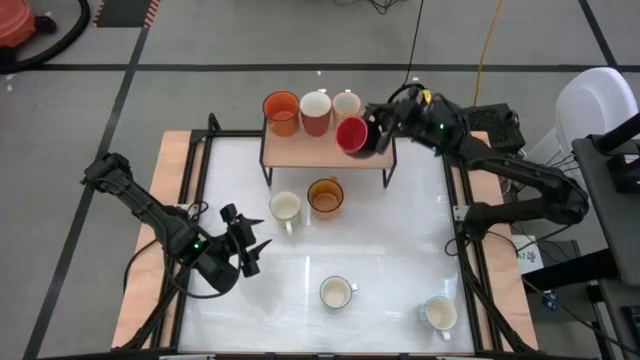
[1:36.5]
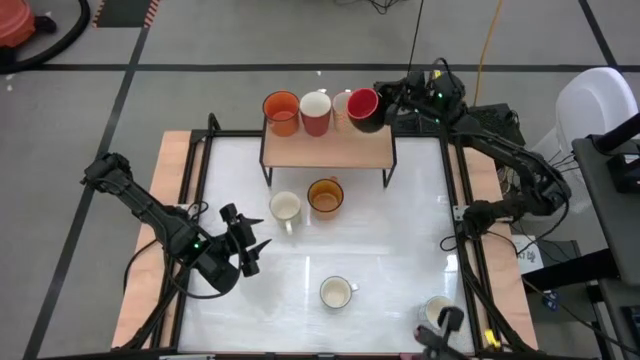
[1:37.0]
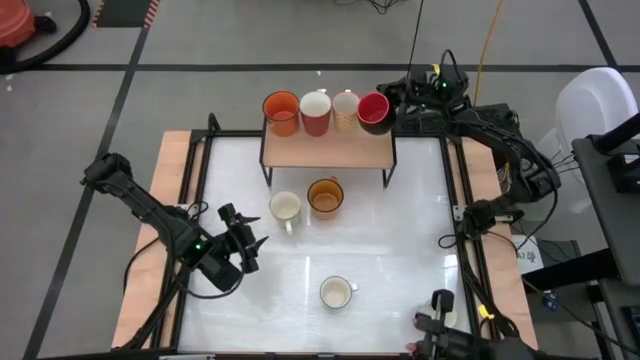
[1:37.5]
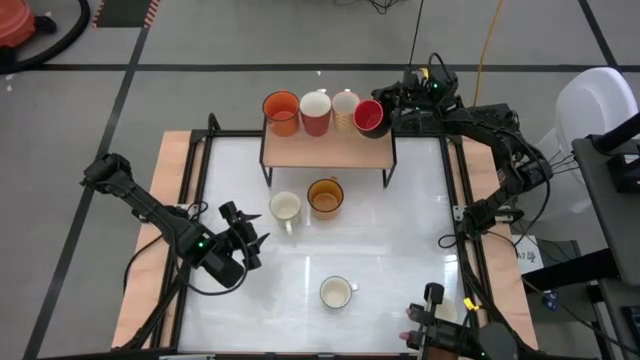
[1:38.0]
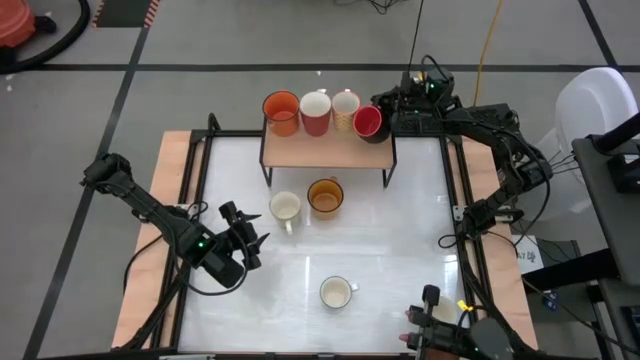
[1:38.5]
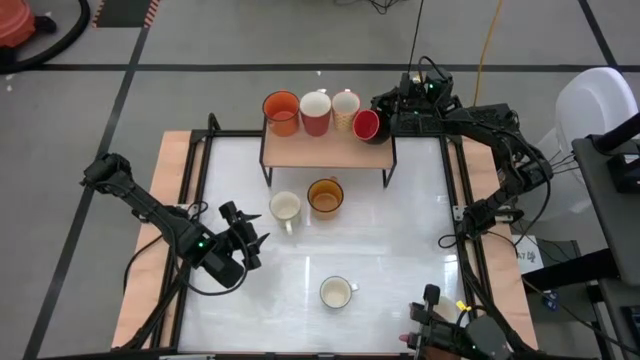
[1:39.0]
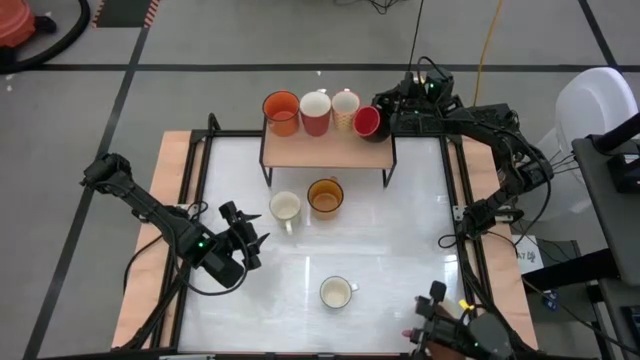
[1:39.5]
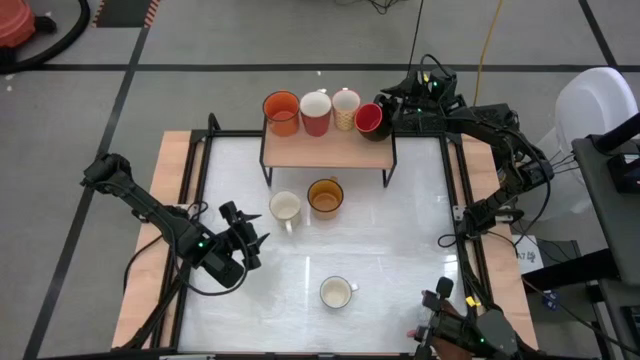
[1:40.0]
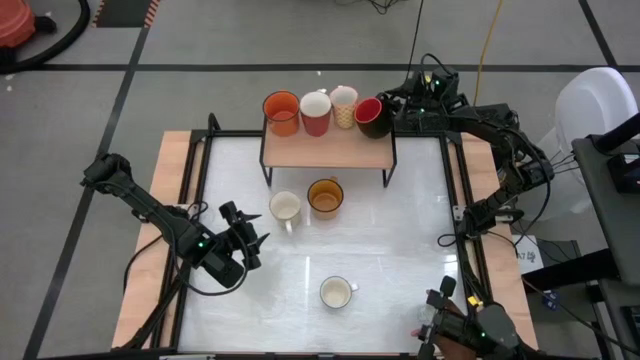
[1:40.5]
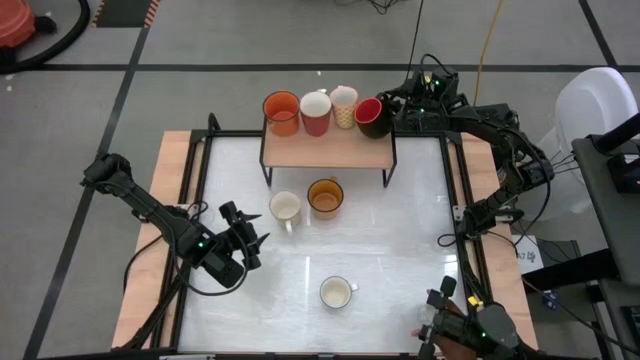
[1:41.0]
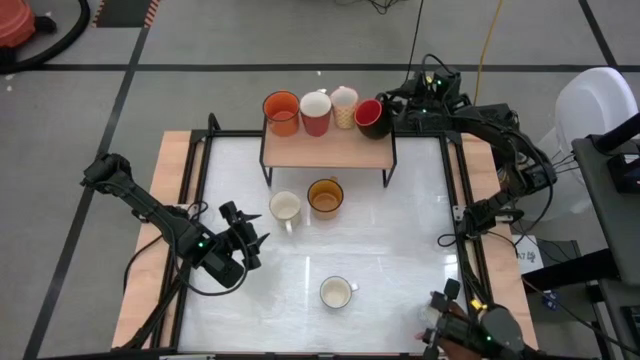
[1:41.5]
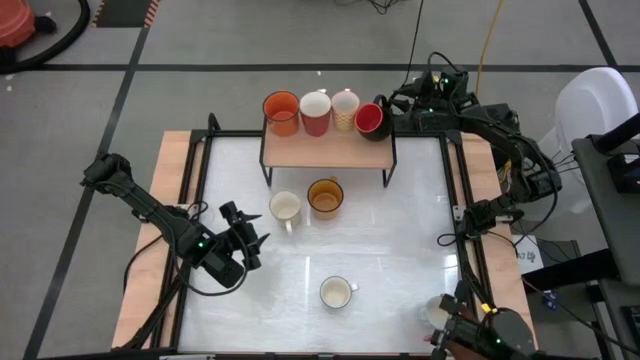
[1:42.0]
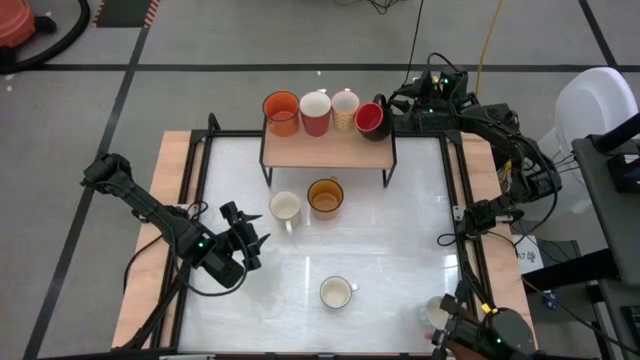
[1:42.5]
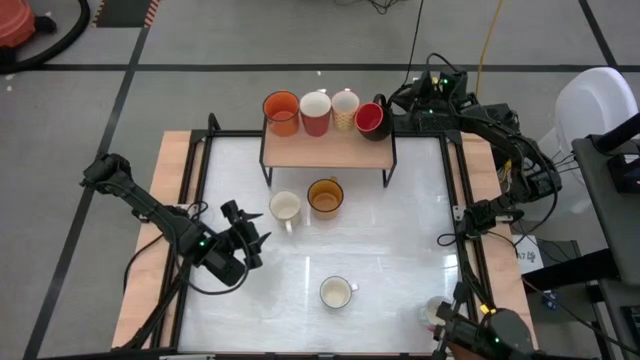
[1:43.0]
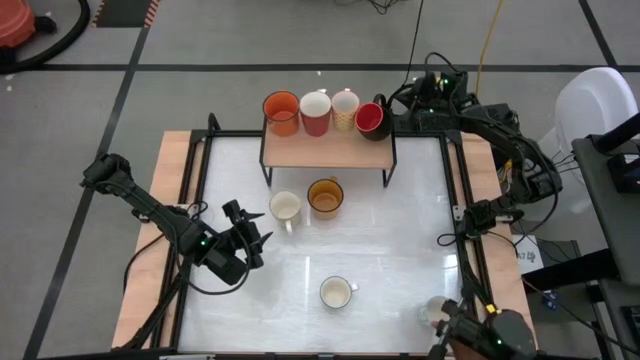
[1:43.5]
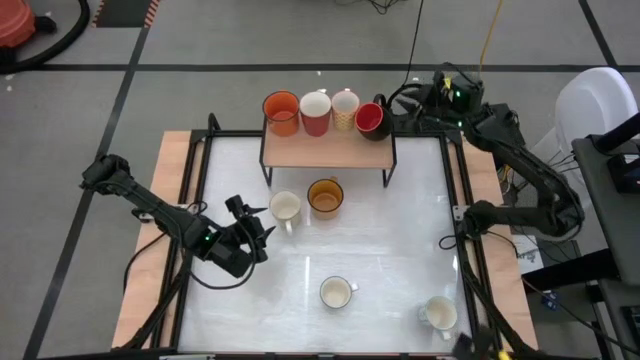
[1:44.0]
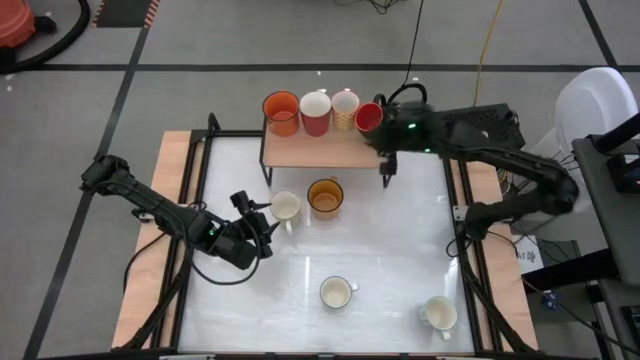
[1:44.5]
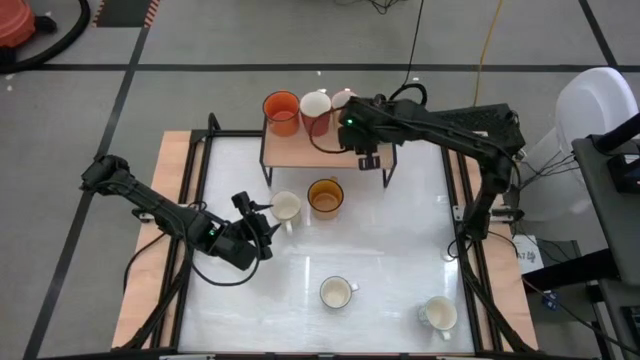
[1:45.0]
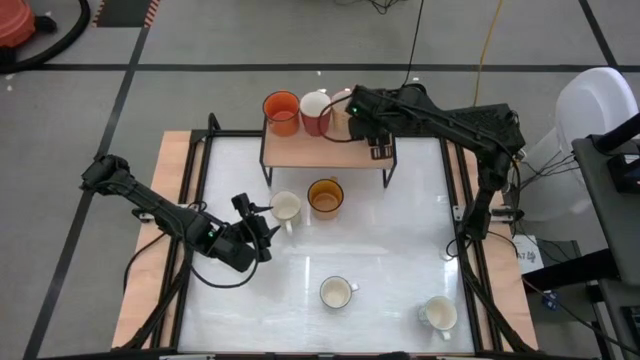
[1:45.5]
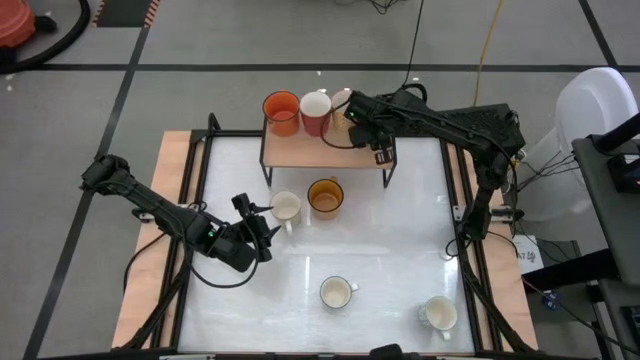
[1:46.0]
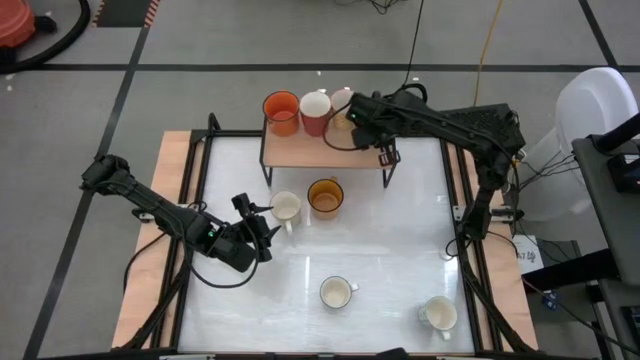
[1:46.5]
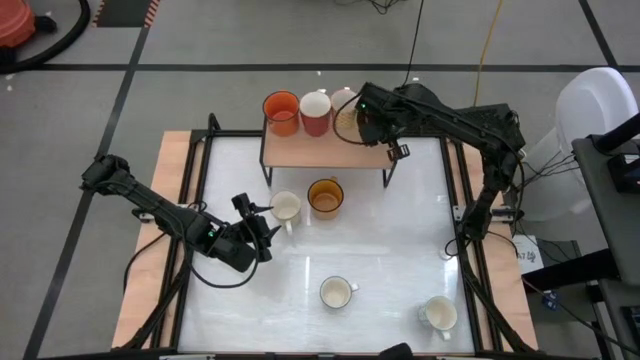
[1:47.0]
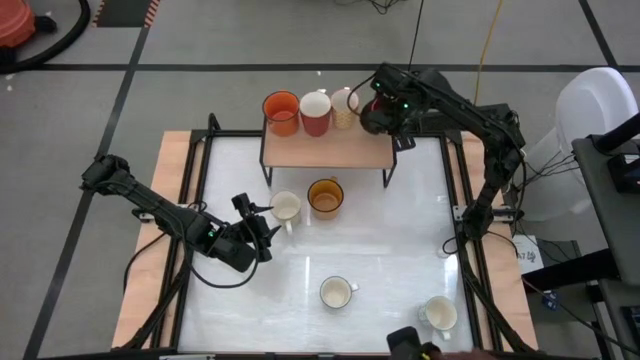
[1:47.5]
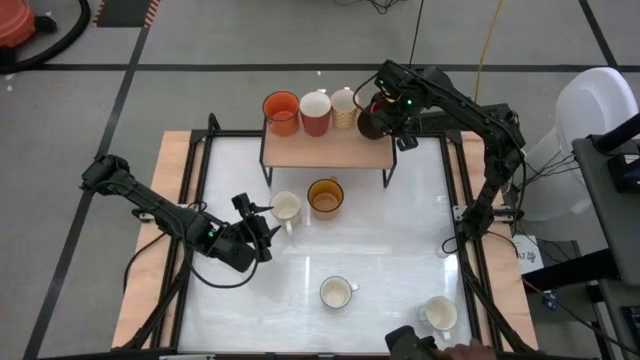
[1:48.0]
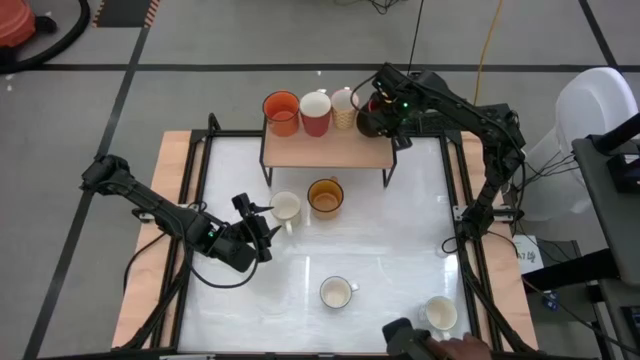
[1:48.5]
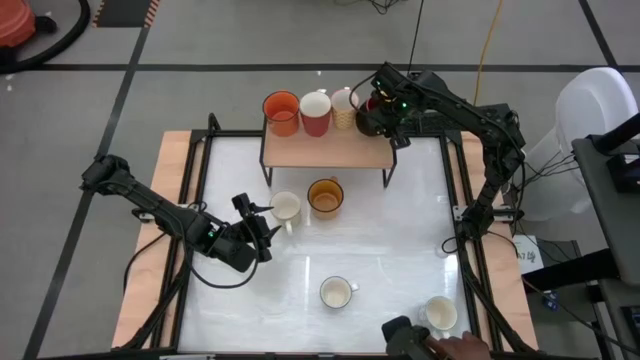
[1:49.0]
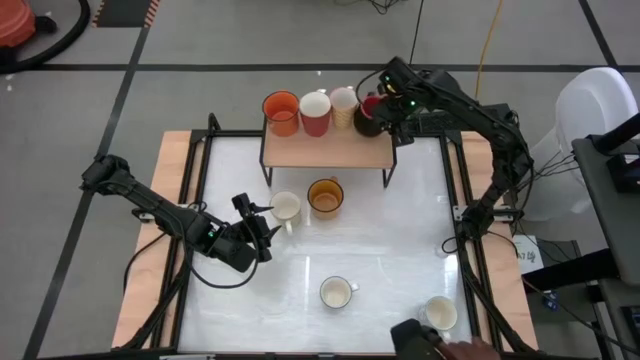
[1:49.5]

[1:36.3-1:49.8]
Task: Place coffee mugs
Put the black mug on the shelf

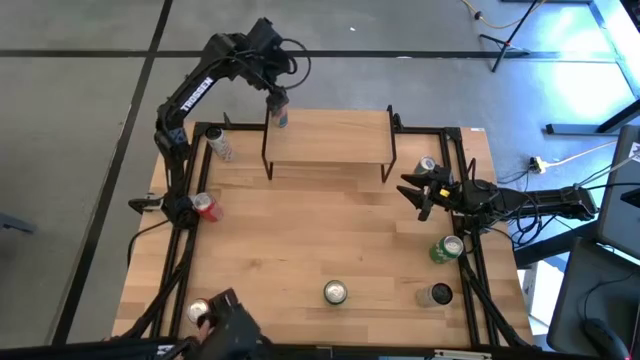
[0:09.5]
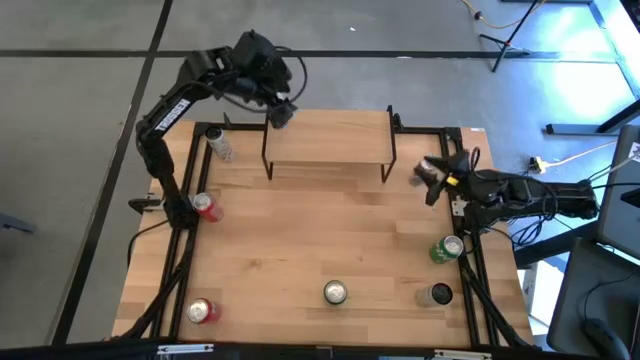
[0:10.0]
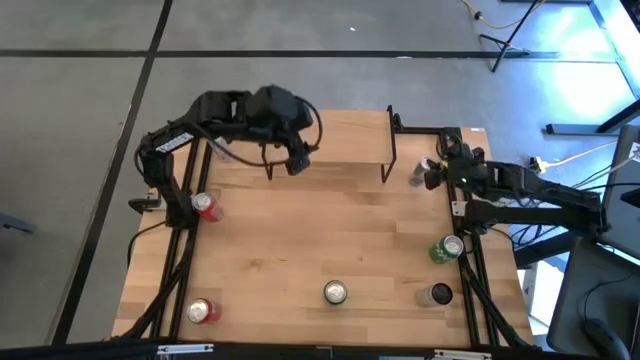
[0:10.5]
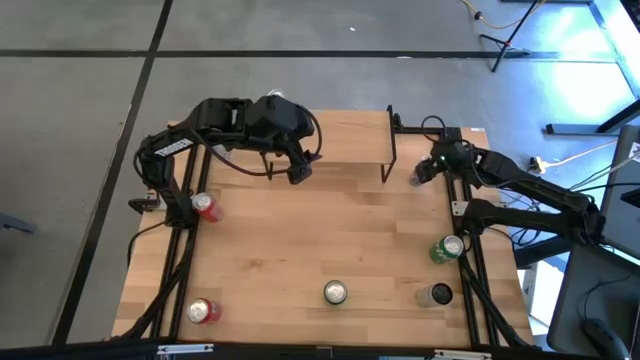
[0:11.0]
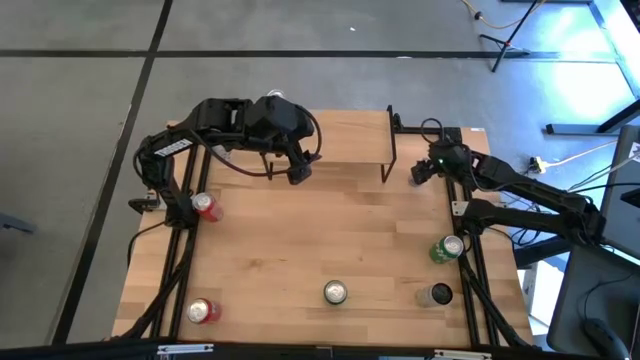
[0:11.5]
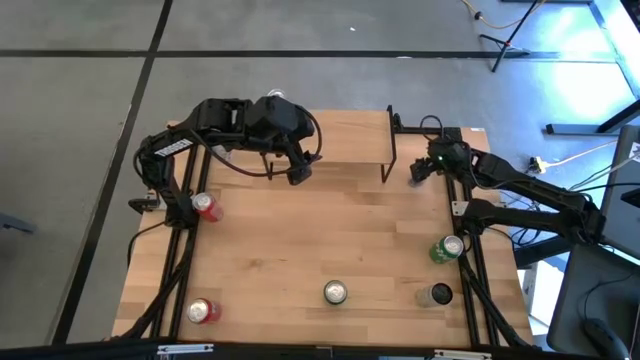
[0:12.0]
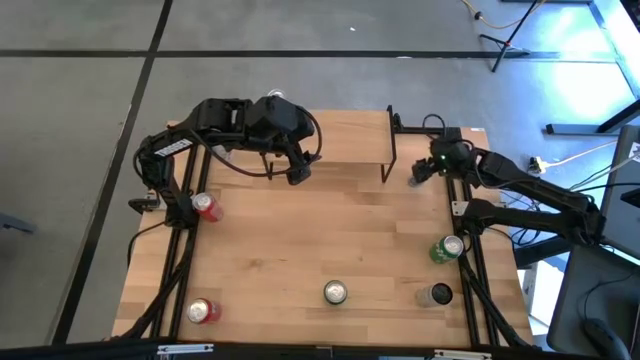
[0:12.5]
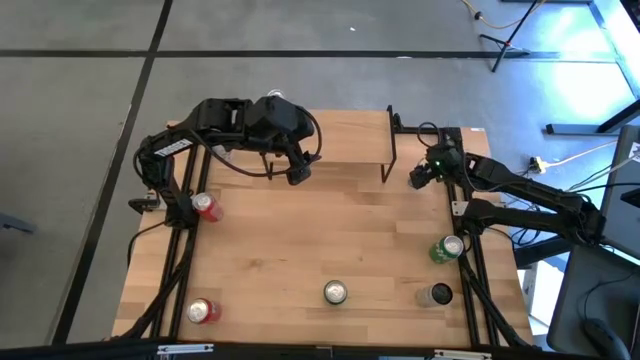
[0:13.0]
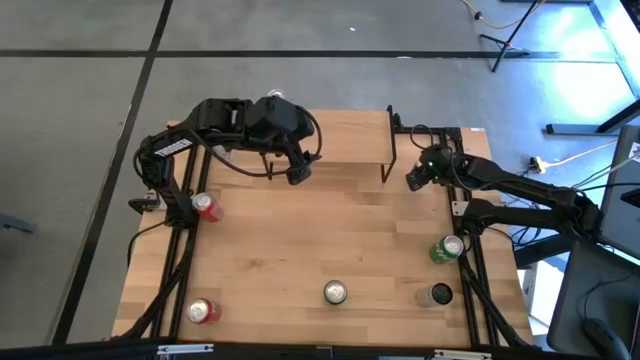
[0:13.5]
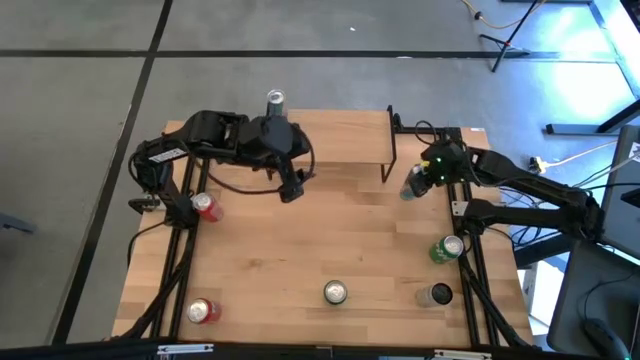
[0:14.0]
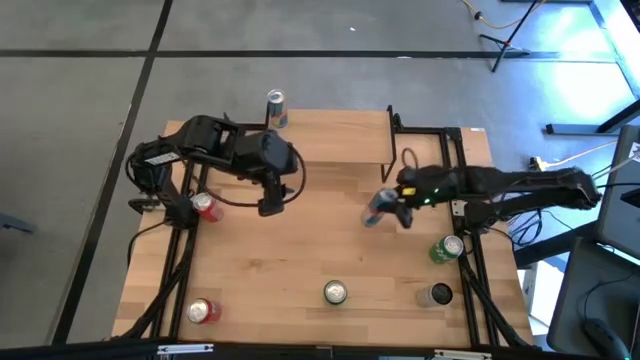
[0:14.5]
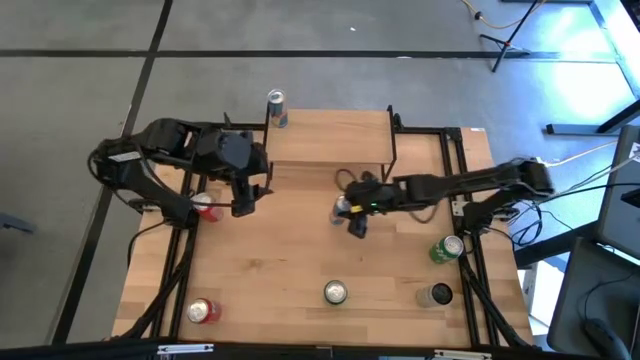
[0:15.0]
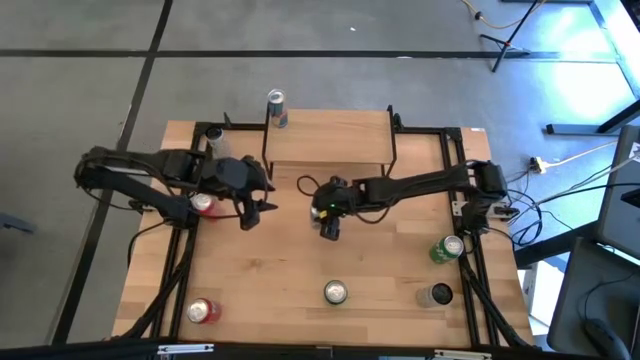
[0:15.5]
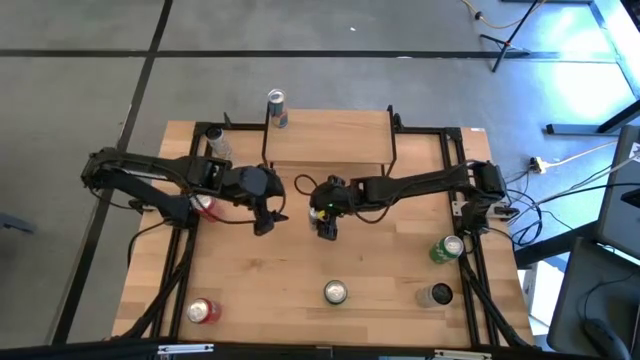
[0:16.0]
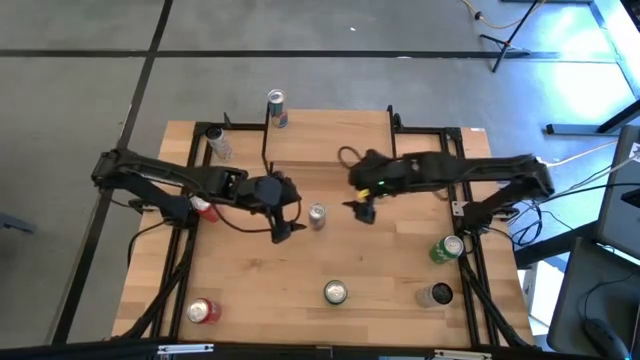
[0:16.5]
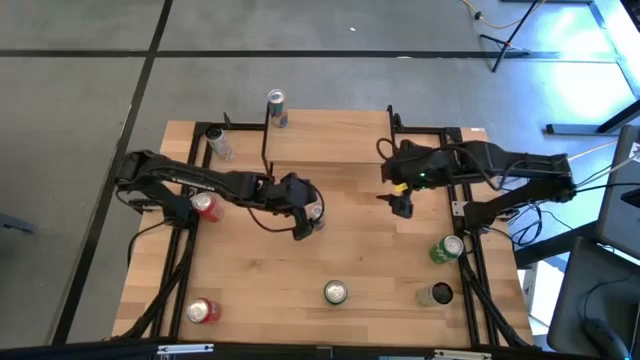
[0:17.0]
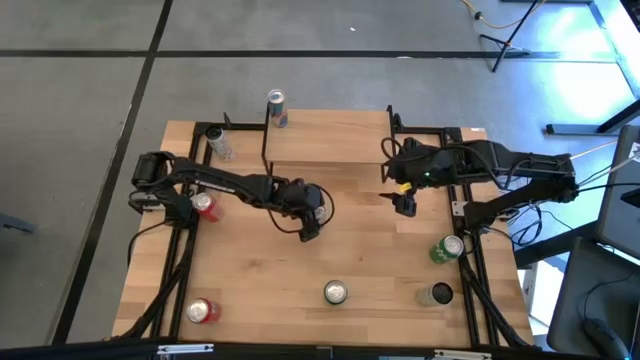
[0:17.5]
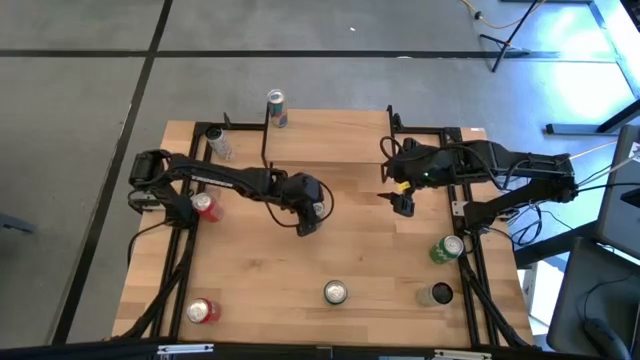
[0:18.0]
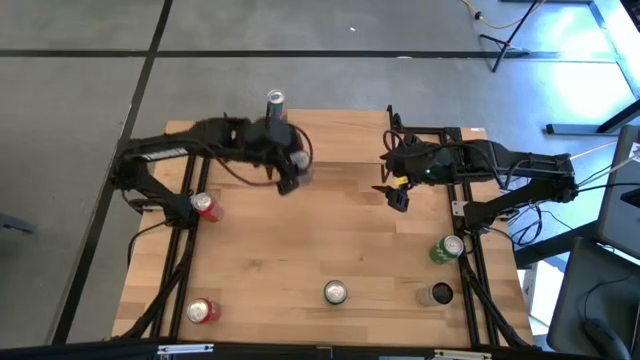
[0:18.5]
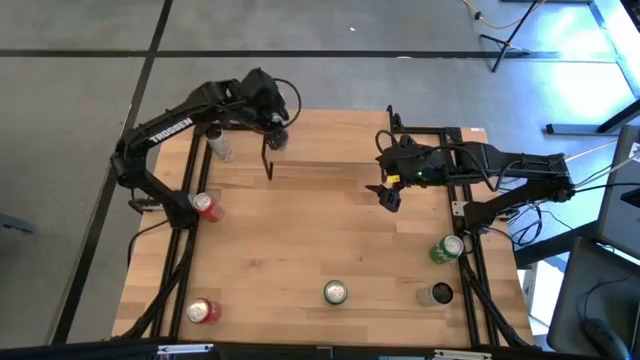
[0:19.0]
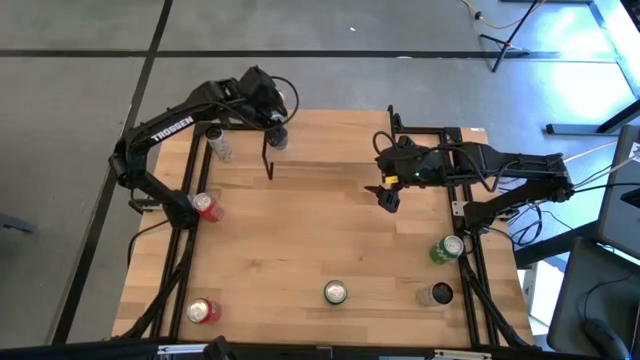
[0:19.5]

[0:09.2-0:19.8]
Task: Place canned beverage on shelf
Put the blue soda can on the shelf aligned with the other blue soda can
